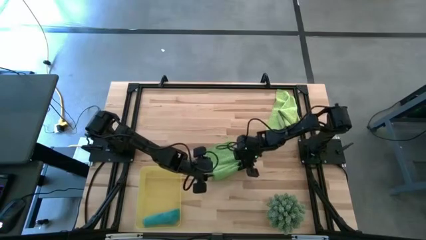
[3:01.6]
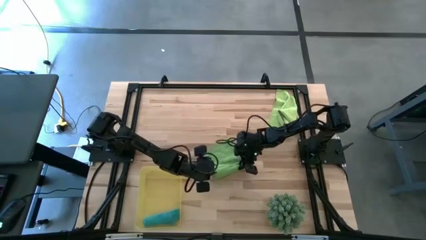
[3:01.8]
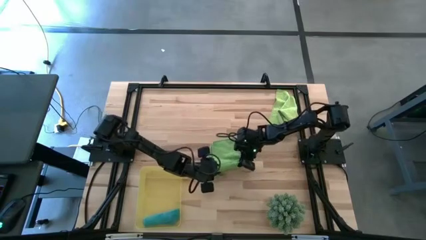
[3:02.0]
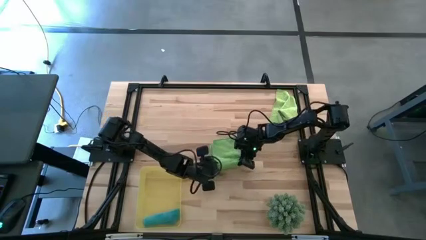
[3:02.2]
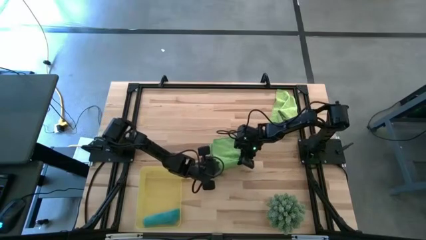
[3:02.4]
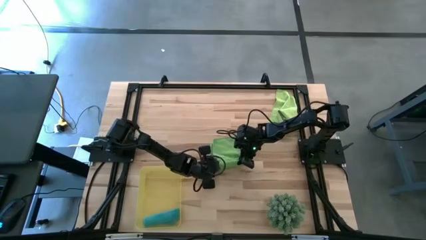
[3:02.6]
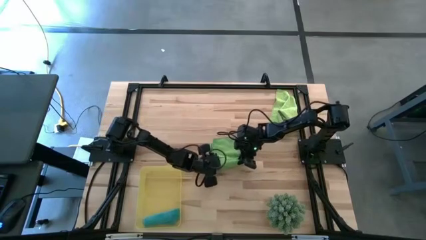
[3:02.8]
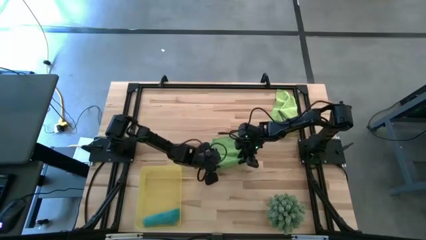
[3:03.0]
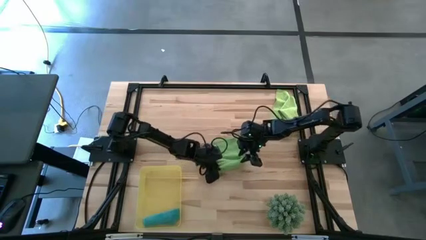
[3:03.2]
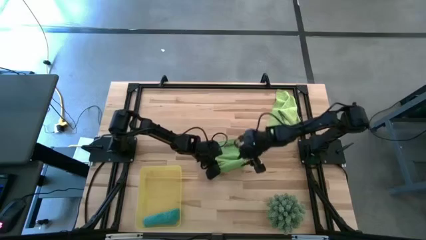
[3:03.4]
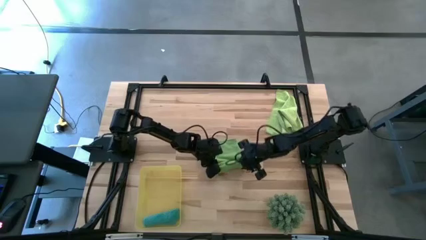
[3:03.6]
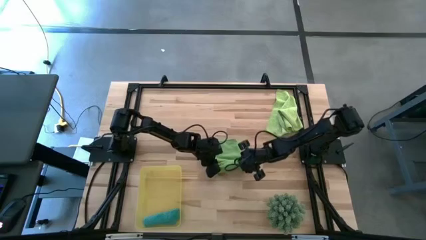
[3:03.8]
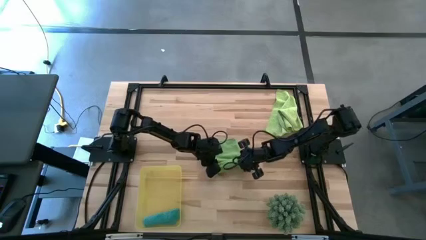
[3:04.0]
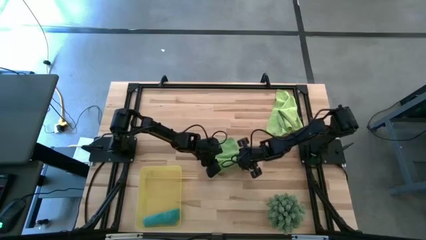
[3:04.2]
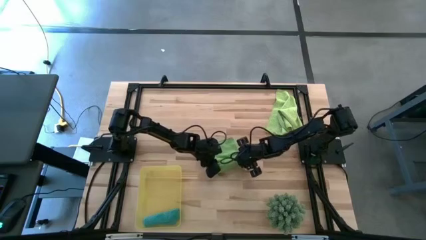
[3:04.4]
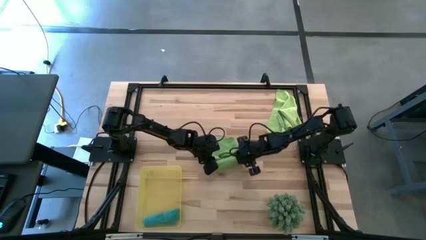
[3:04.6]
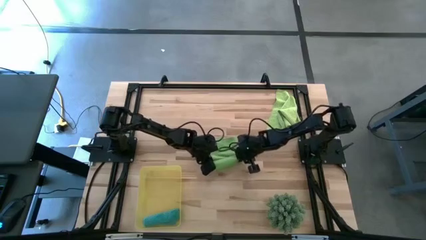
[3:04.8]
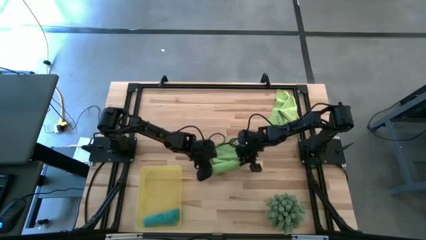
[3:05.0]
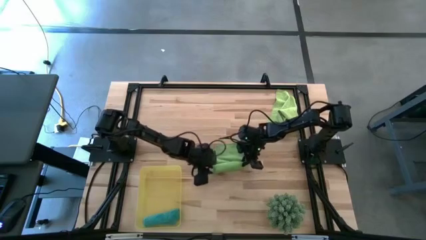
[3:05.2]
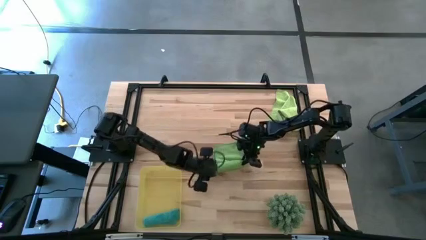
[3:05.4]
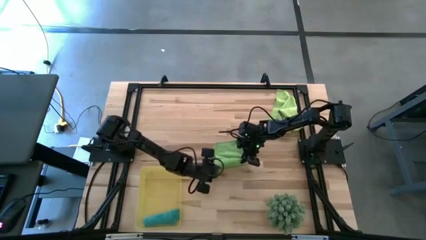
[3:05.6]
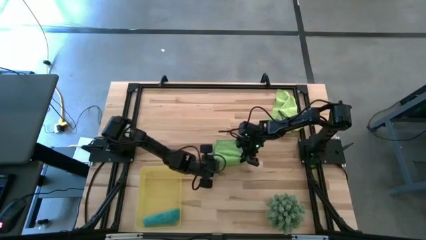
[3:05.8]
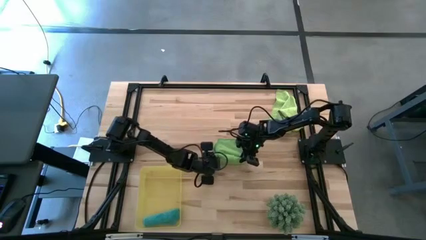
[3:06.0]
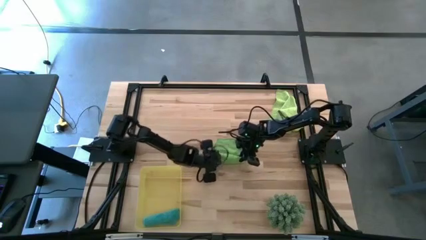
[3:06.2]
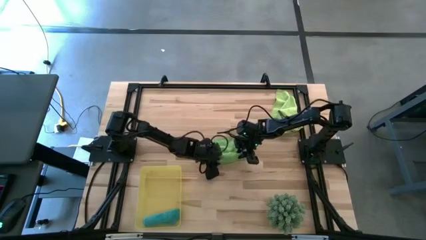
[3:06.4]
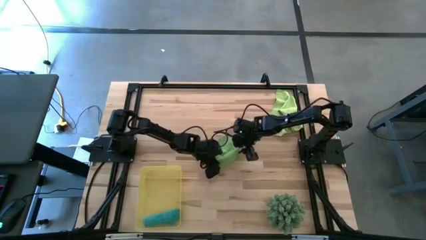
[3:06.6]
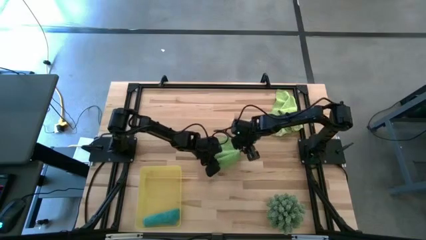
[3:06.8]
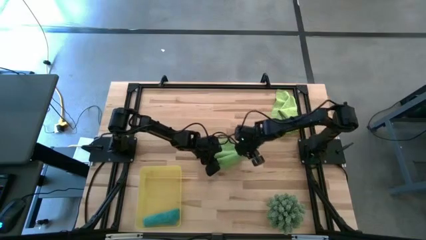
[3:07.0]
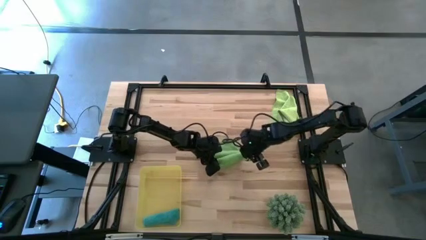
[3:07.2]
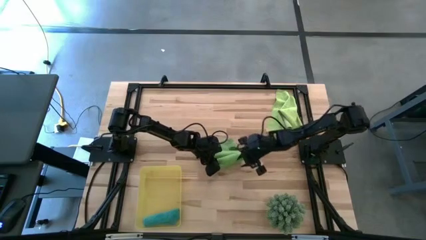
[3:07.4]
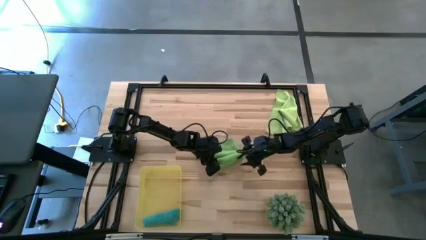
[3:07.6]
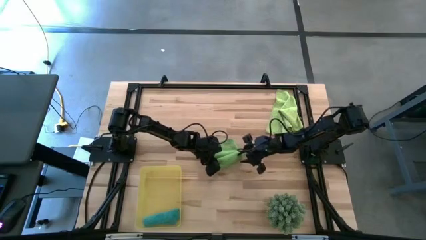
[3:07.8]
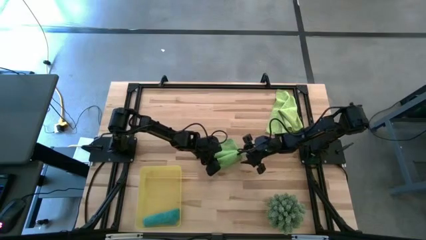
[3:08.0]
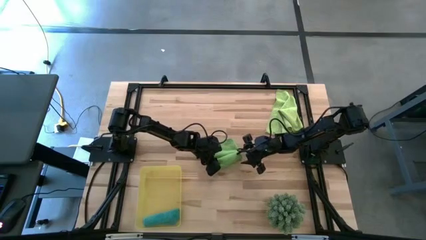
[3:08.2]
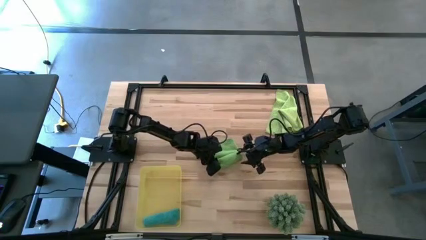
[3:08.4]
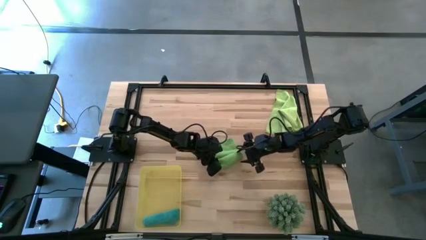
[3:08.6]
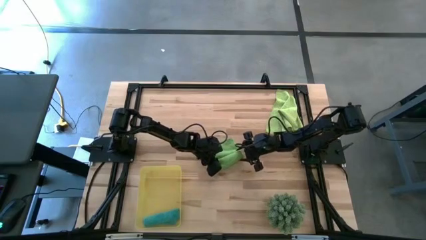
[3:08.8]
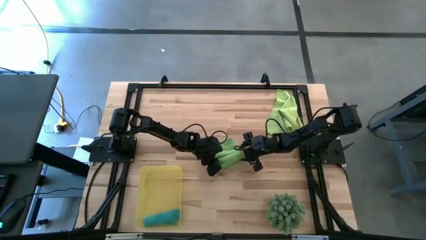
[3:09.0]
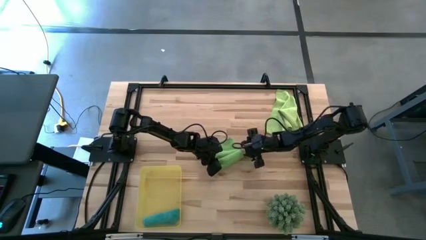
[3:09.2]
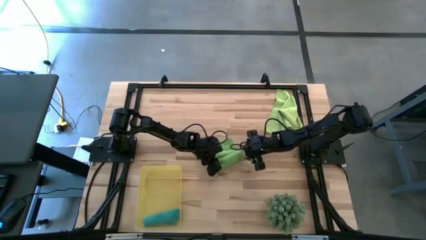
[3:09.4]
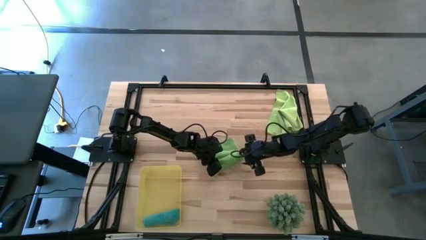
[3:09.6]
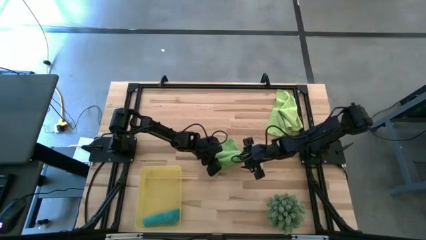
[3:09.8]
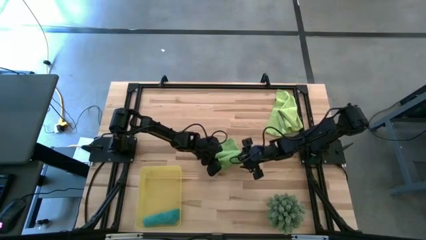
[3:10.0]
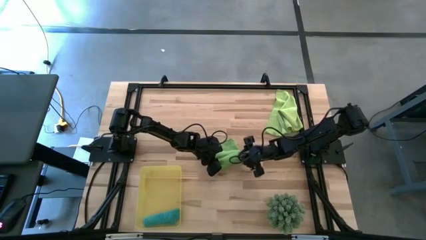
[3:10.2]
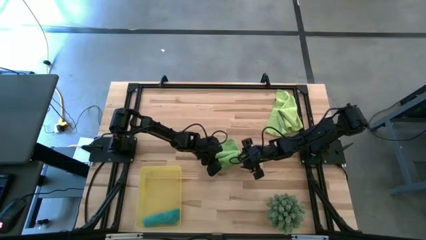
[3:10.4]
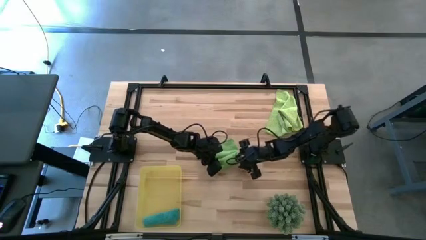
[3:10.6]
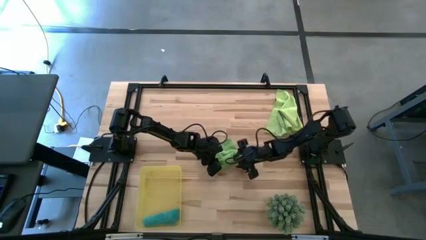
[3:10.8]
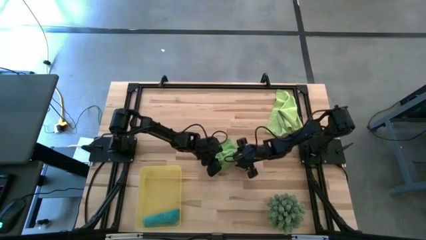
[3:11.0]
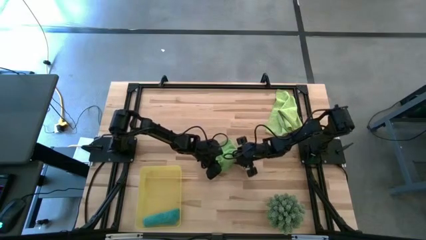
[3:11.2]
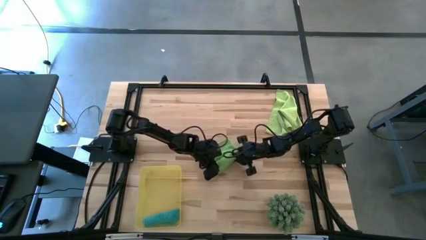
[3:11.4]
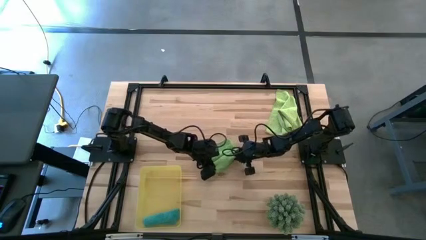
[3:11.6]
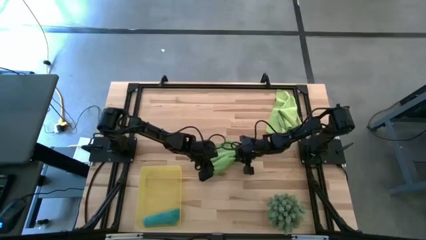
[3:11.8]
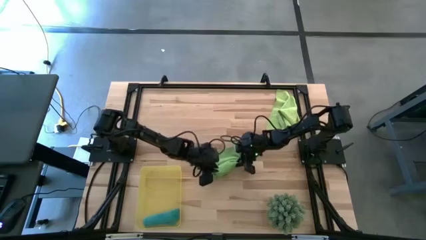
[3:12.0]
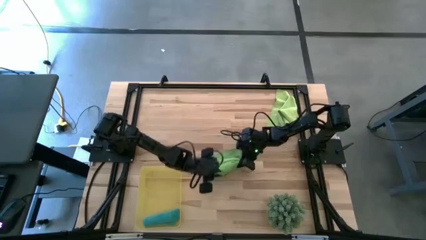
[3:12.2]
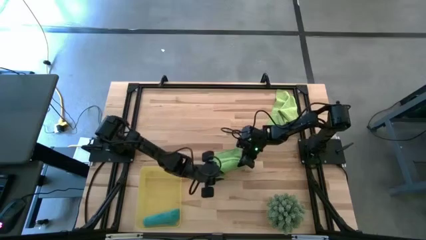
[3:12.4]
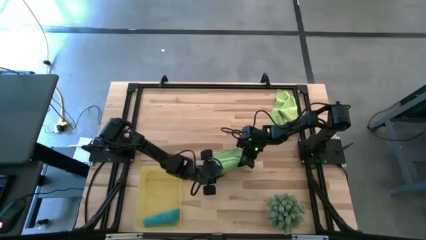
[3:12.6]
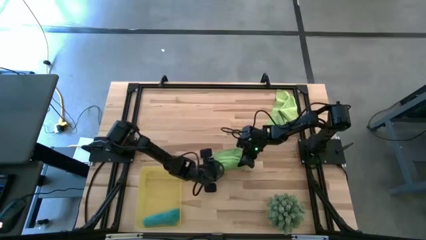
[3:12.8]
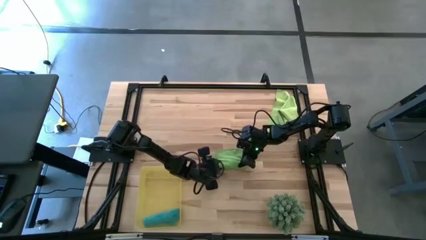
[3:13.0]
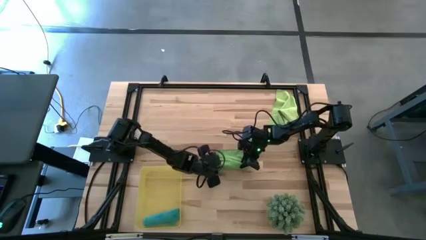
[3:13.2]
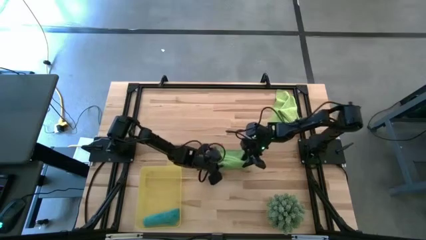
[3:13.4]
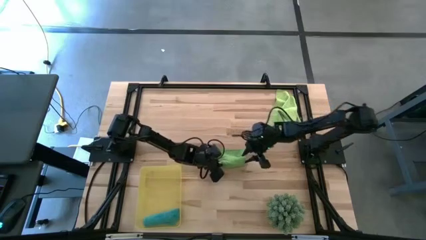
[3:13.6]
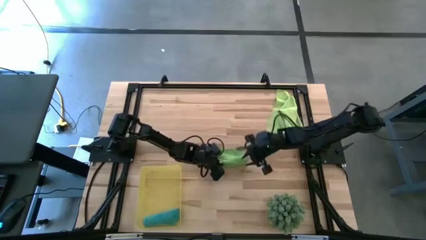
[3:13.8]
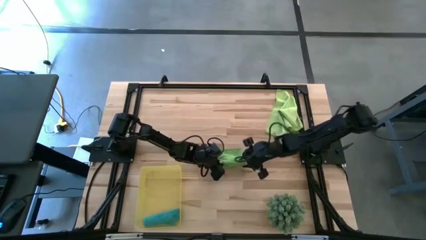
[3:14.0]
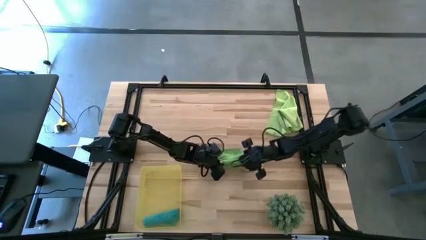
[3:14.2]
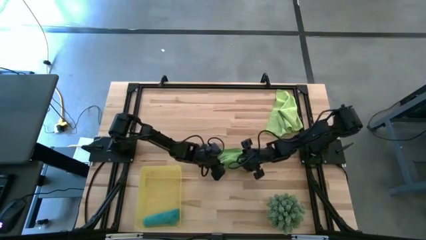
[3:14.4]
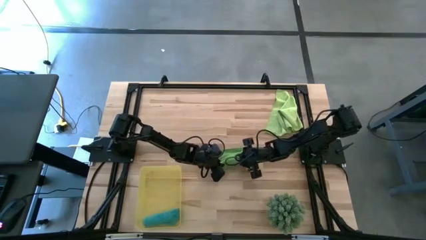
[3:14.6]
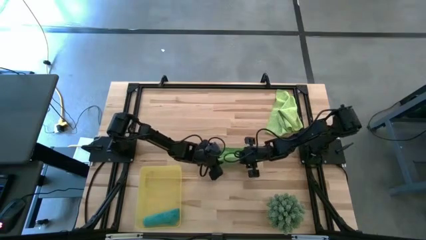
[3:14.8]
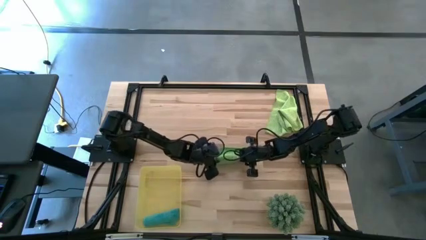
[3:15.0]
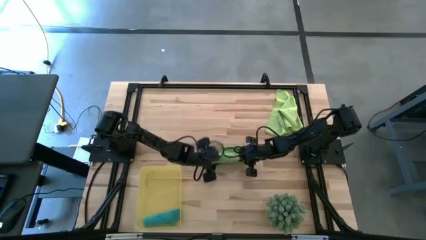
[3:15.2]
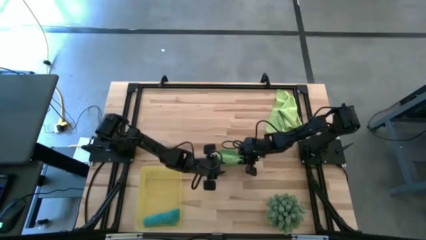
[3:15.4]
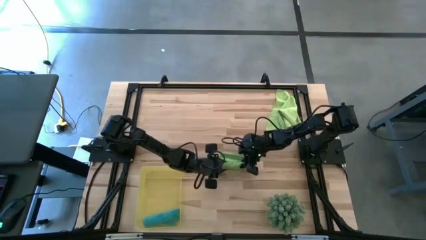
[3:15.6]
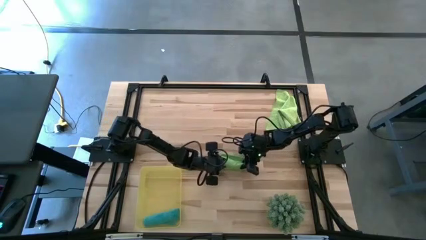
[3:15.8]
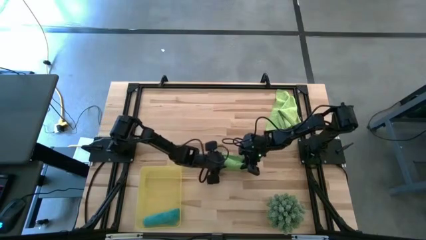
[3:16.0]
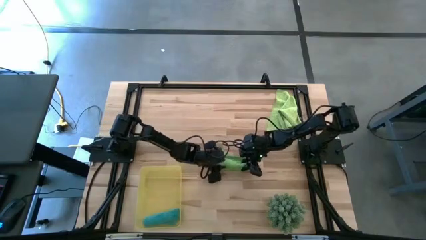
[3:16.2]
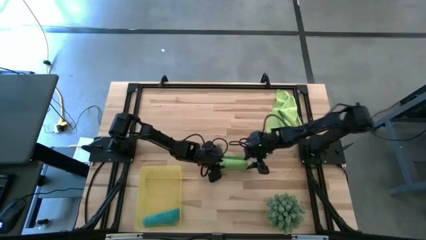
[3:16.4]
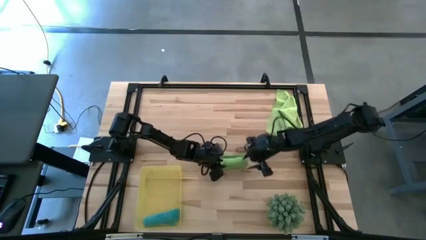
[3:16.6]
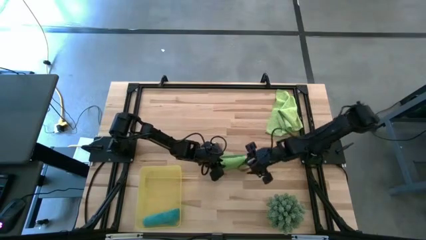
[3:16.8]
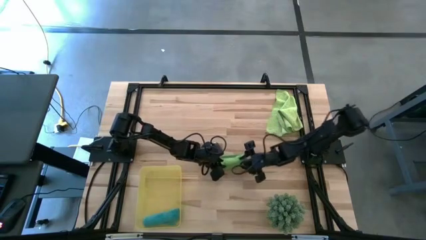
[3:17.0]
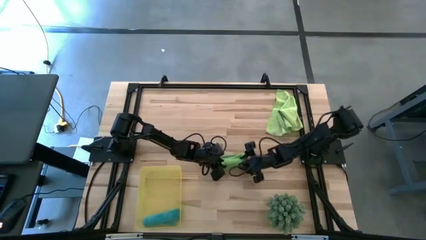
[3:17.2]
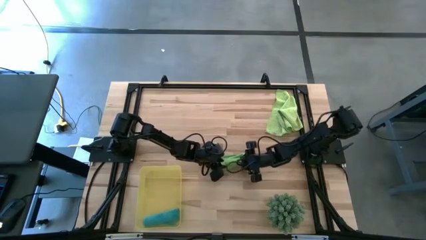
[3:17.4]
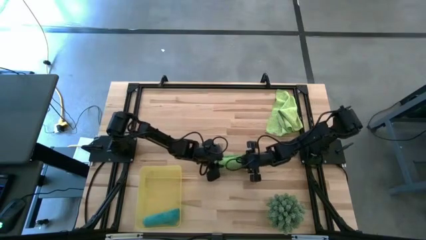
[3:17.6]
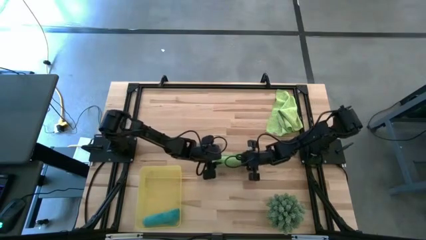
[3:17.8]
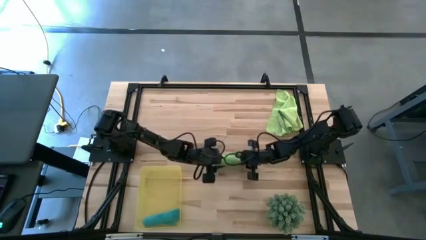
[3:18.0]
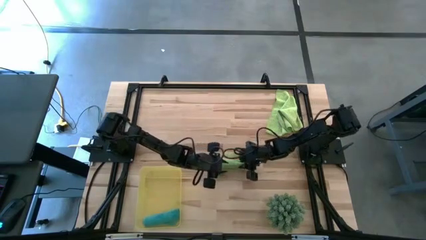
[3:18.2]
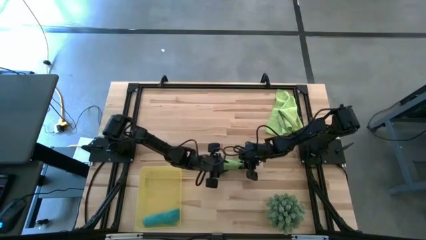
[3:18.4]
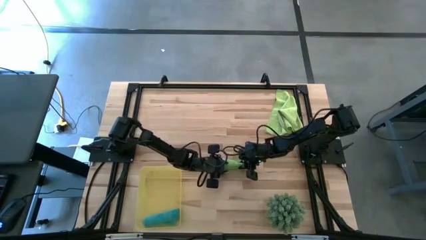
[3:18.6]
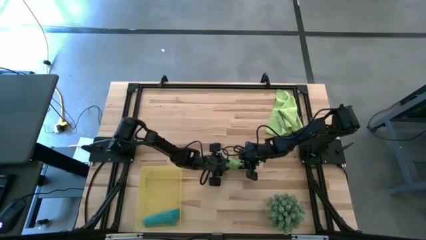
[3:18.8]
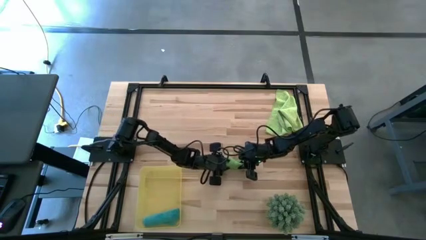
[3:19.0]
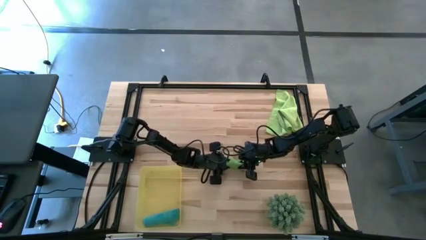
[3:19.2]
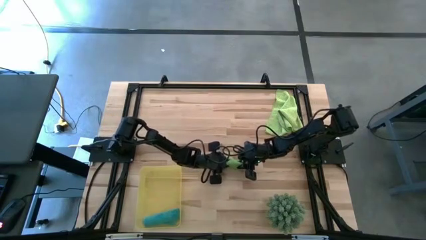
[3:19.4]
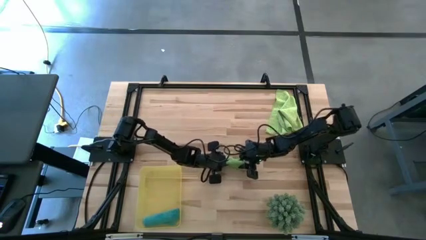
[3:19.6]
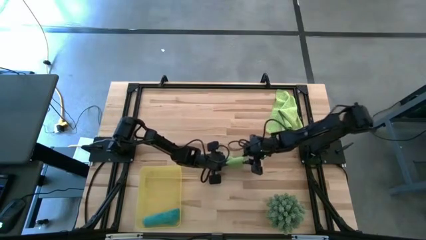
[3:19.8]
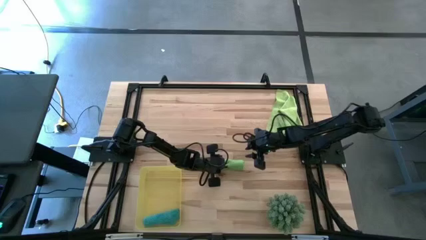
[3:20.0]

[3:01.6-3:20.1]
Task: Roll microfiber towels into tight, uniform cylinder then place into a basket
Roll the green microfiber towel
